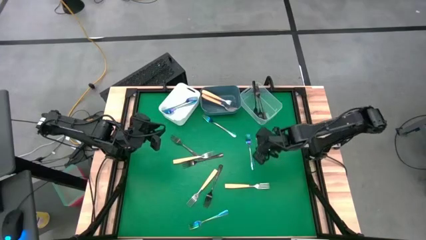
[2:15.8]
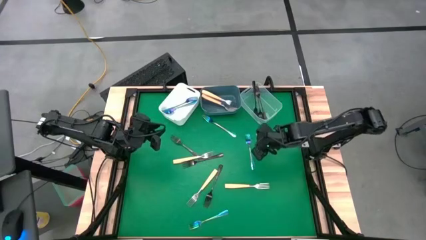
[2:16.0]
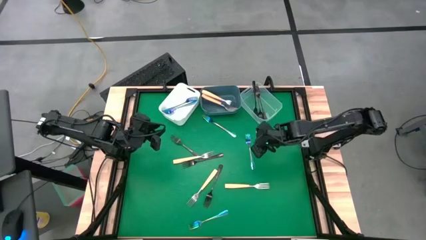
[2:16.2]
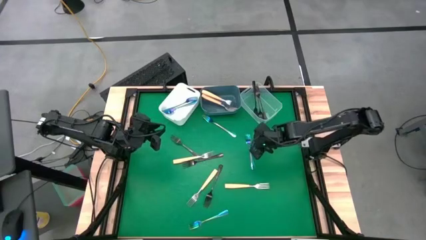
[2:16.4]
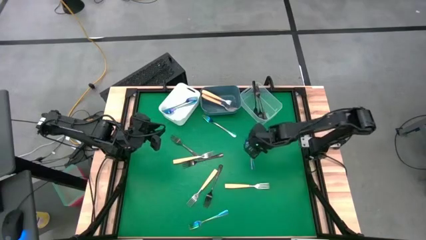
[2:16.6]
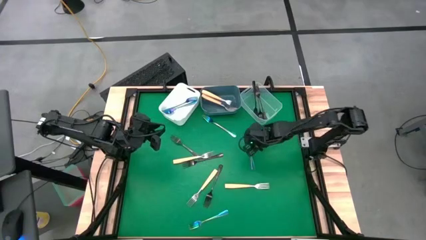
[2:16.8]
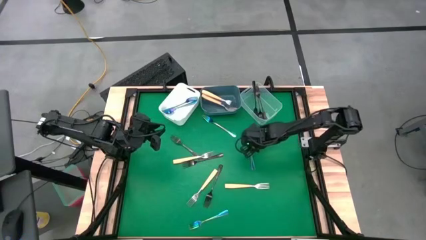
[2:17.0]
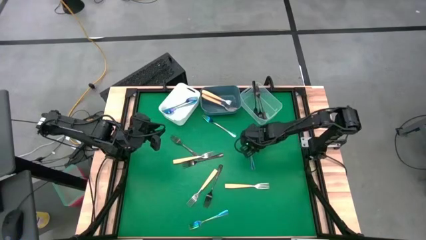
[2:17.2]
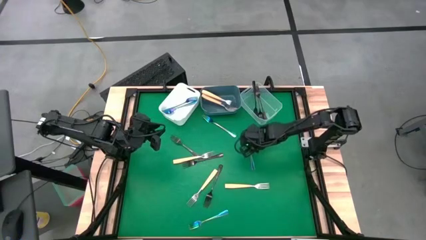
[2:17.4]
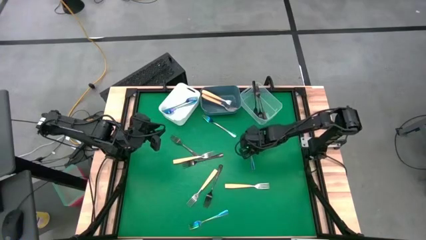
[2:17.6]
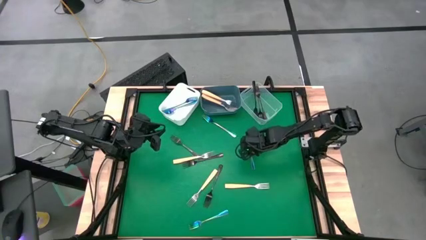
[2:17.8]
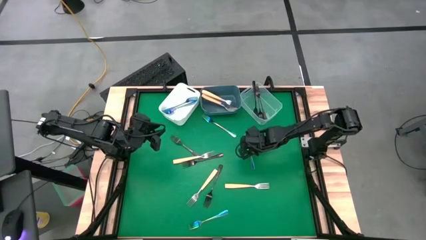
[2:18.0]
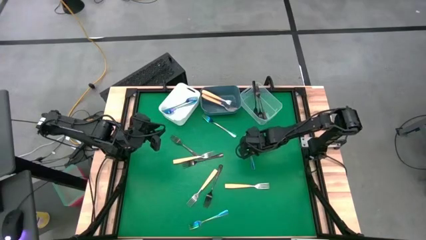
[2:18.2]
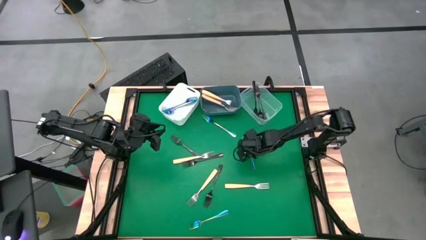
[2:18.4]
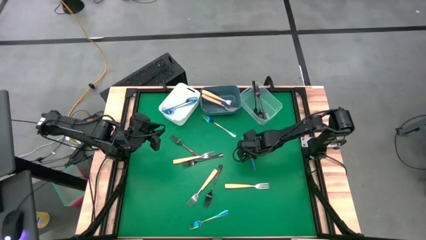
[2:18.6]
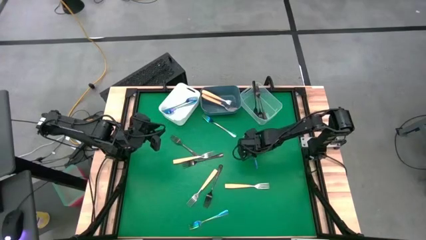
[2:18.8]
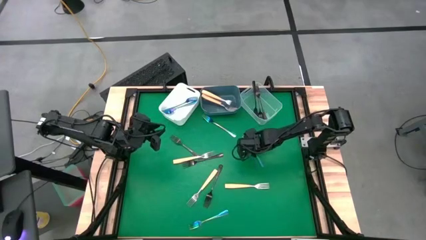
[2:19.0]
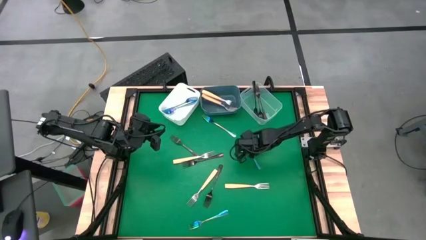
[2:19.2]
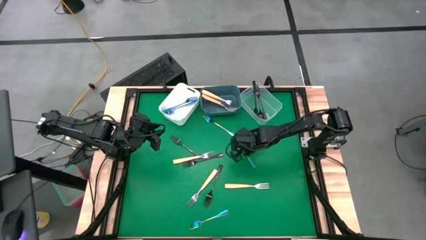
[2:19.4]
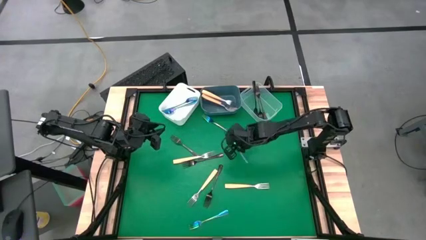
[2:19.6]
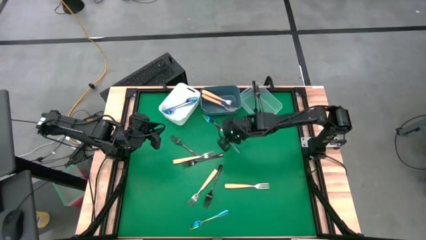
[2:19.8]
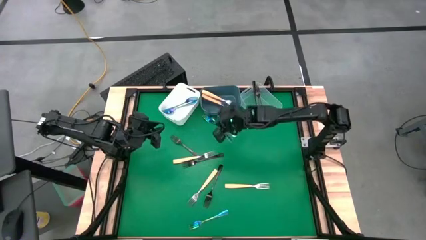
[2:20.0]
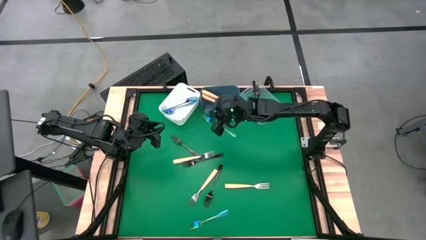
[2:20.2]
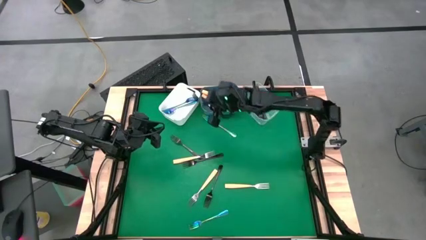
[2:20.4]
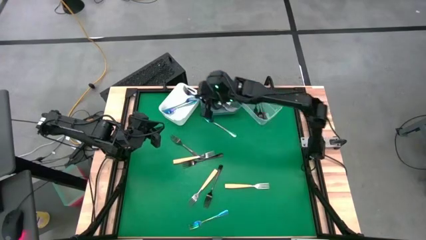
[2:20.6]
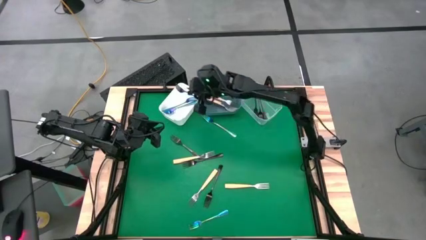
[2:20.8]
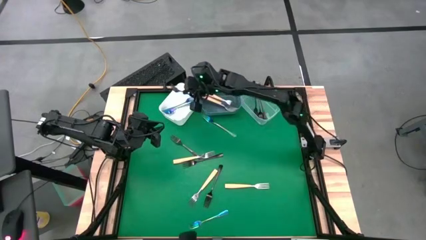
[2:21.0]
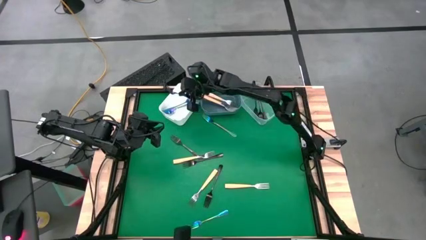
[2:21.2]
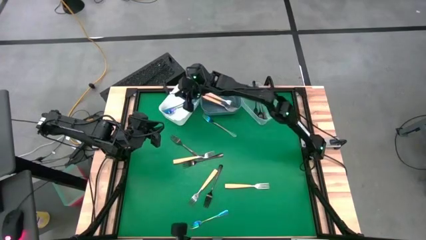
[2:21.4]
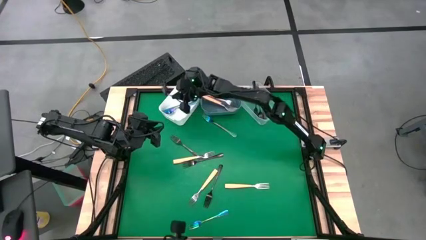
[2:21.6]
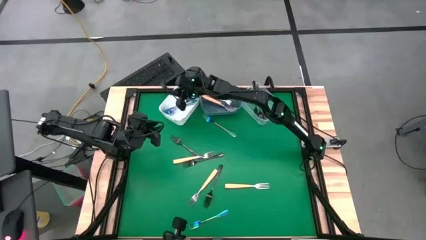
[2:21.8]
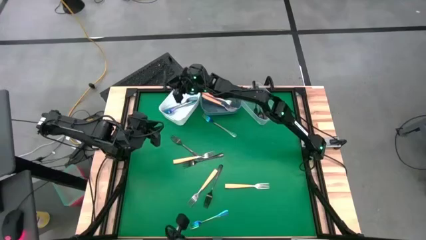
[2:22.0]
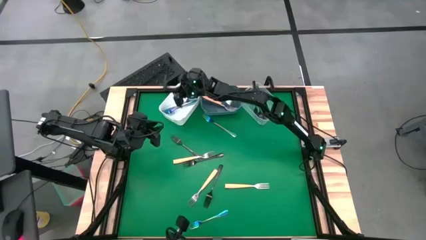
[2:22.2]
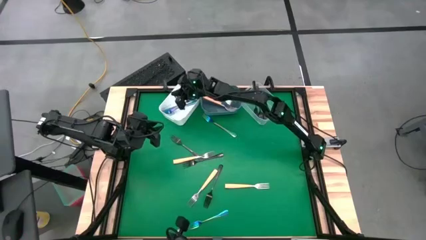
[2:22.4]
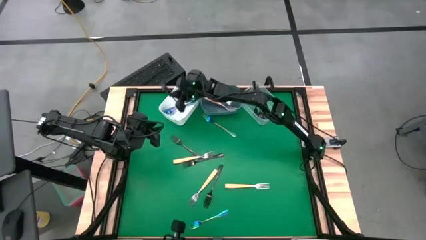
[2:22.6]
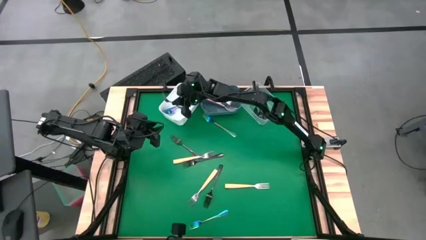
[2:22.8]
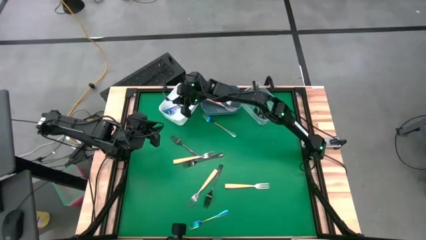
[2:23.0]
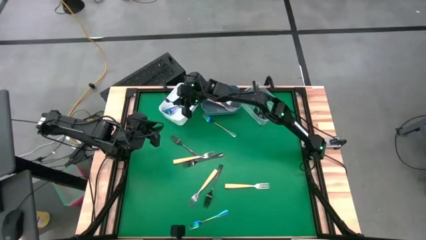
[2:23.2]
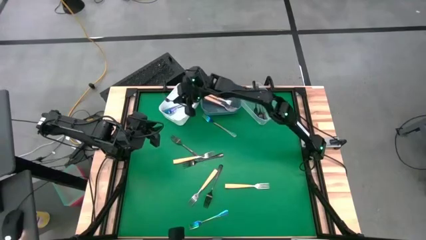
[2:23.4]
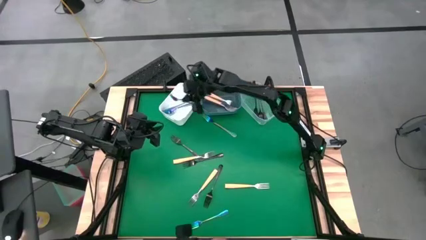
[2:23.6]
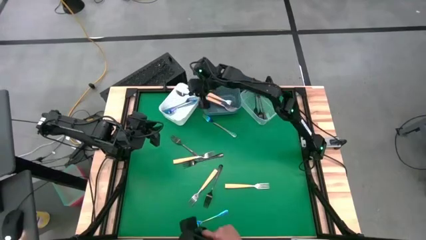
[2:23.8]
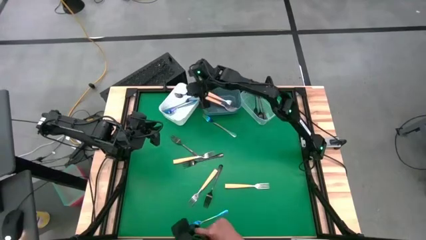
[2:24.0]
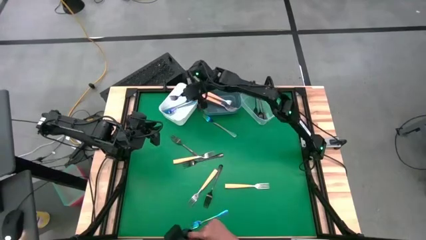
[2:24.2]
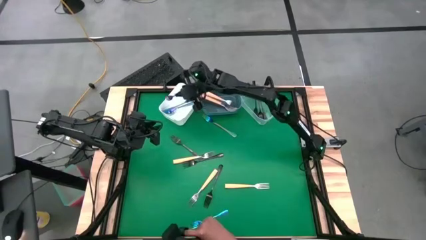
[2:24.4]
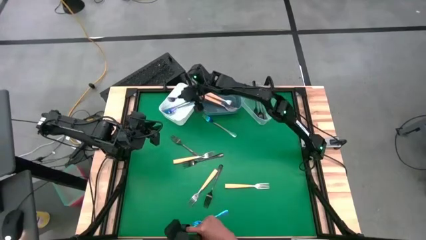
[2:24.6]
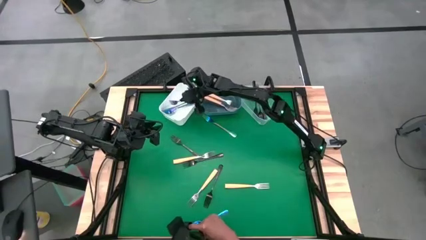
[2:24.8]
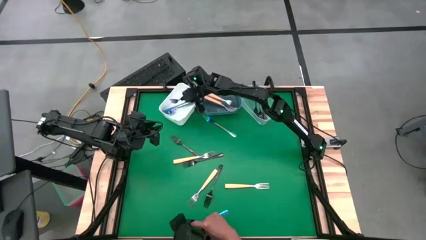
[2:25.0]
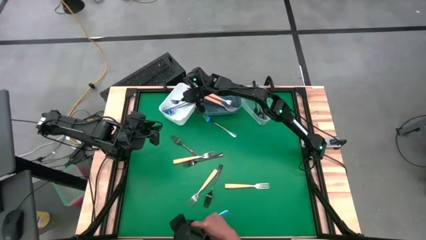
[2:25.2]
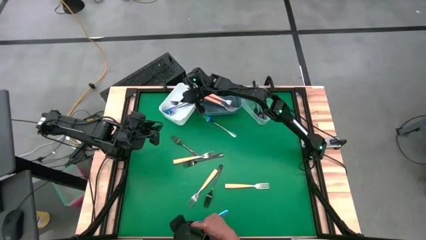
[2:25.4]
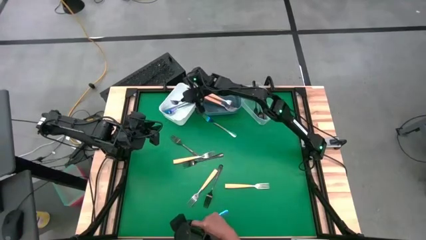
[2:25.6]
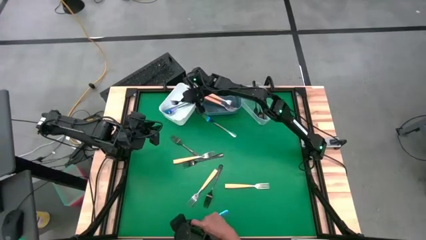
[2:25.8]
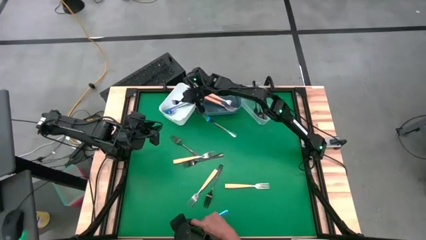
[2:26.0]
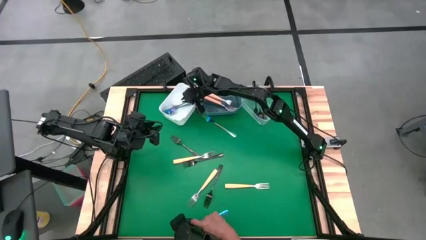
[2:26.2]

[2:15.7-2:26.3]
Task: Sort silverware by color (type)
Put the blue fork into the white bin

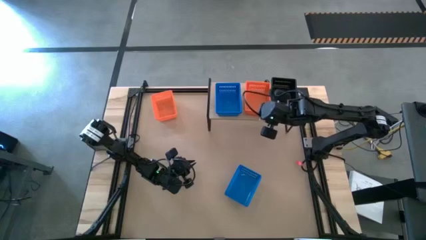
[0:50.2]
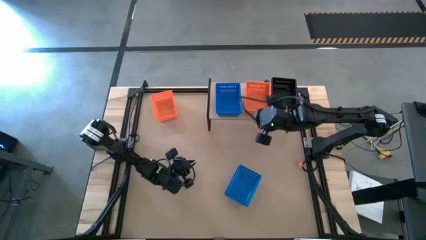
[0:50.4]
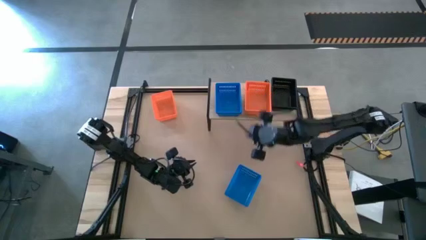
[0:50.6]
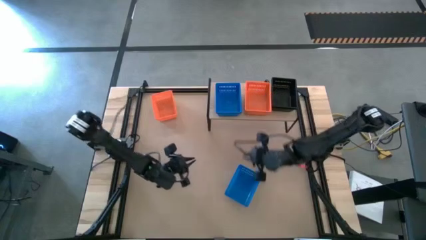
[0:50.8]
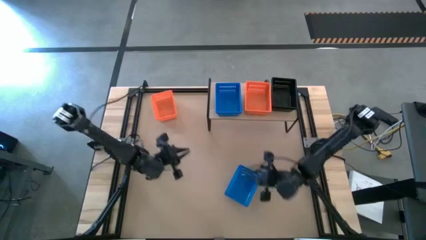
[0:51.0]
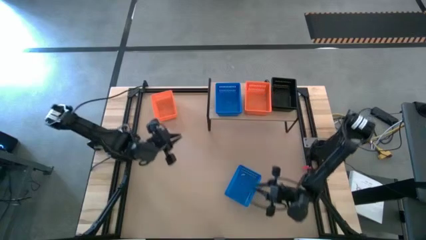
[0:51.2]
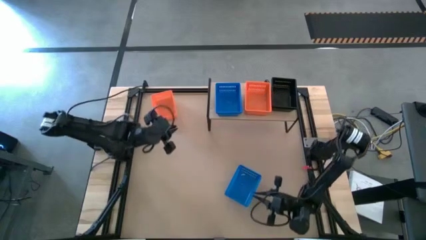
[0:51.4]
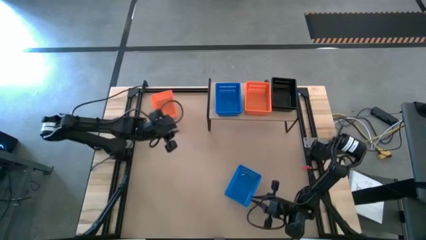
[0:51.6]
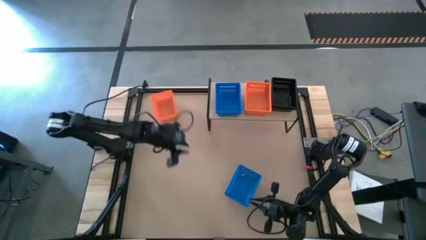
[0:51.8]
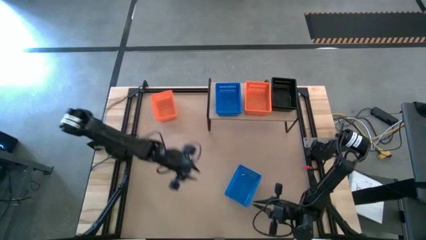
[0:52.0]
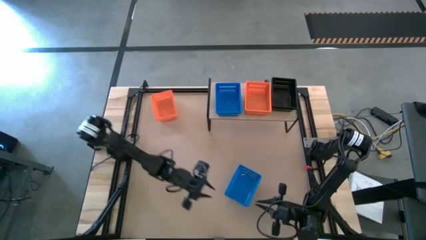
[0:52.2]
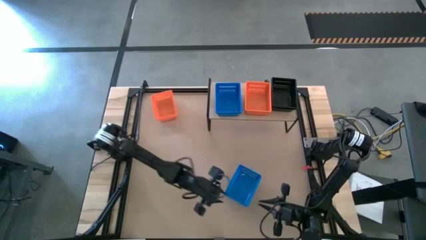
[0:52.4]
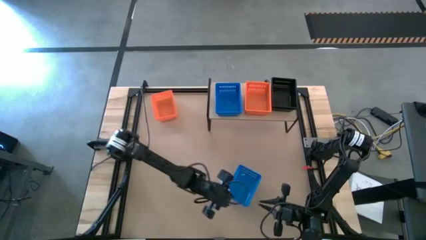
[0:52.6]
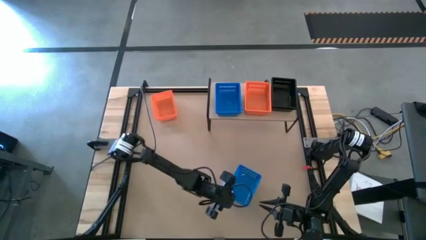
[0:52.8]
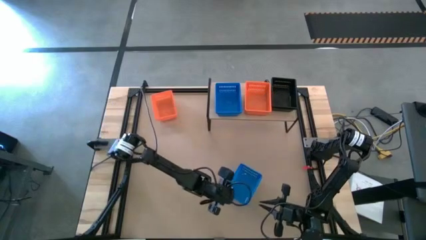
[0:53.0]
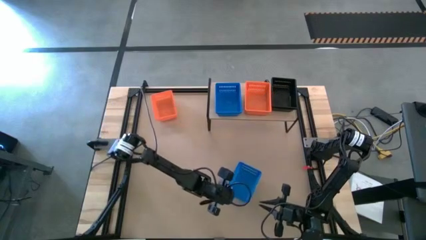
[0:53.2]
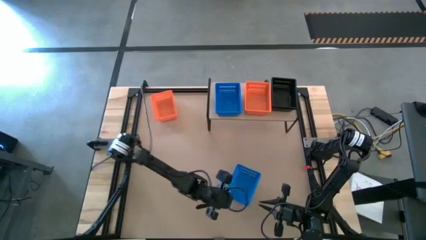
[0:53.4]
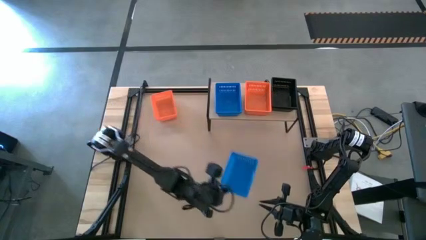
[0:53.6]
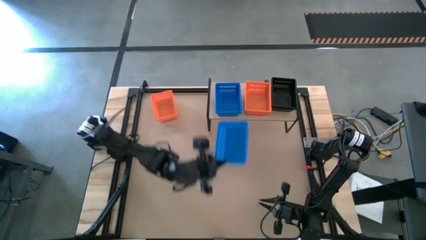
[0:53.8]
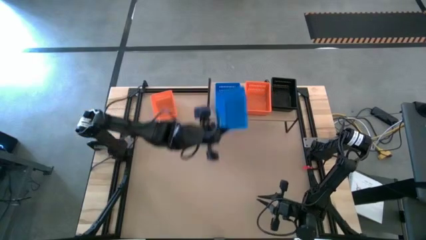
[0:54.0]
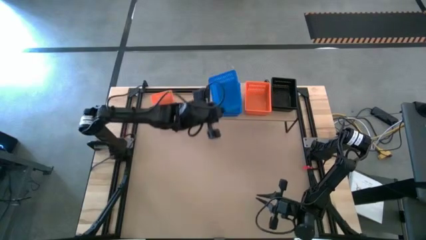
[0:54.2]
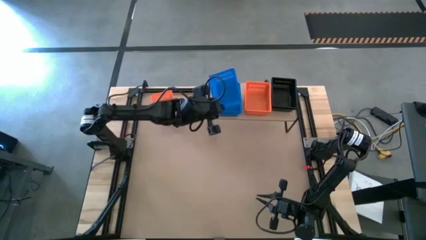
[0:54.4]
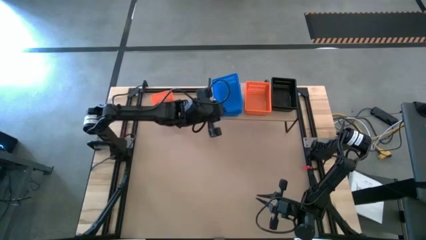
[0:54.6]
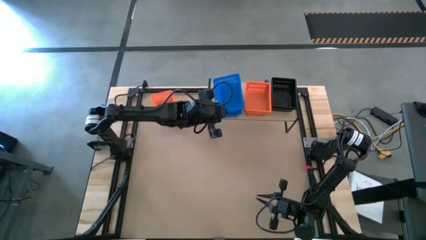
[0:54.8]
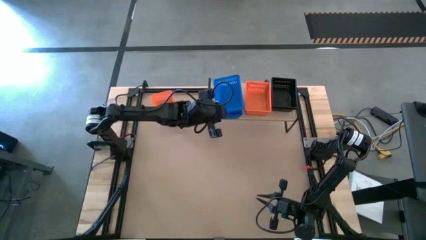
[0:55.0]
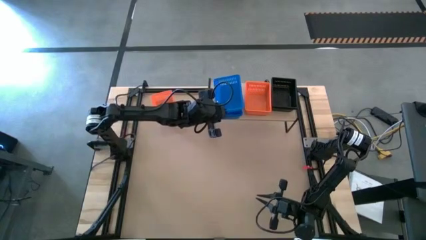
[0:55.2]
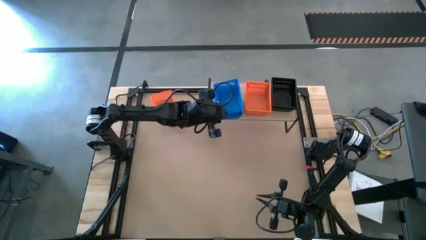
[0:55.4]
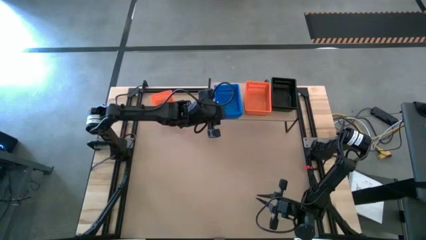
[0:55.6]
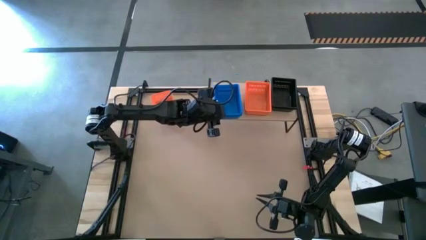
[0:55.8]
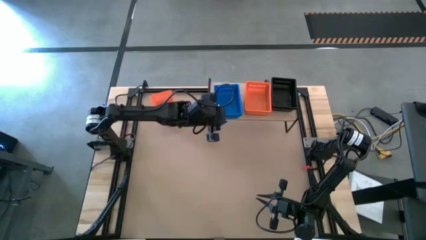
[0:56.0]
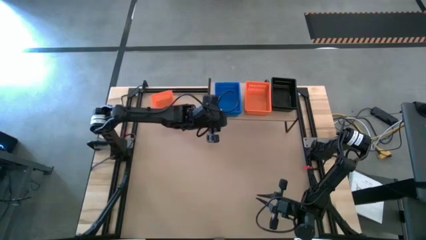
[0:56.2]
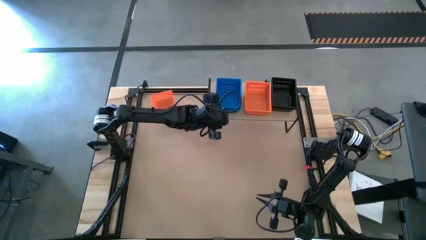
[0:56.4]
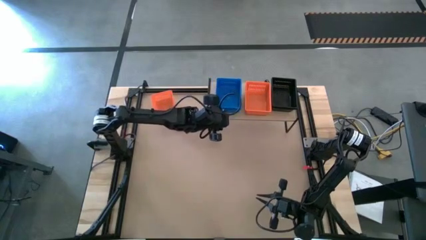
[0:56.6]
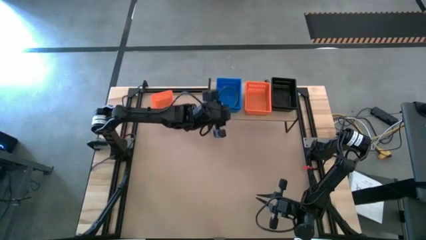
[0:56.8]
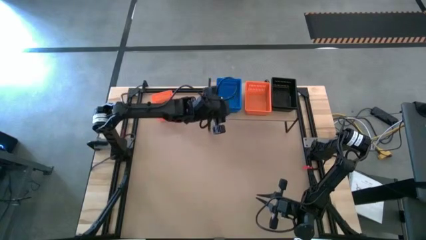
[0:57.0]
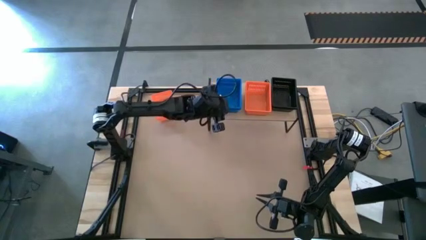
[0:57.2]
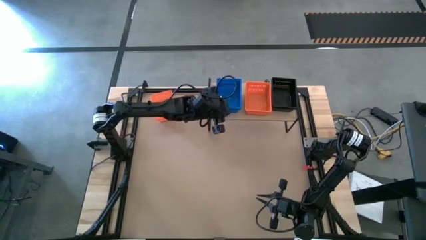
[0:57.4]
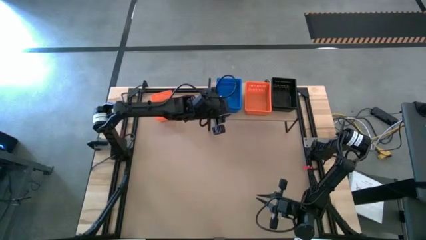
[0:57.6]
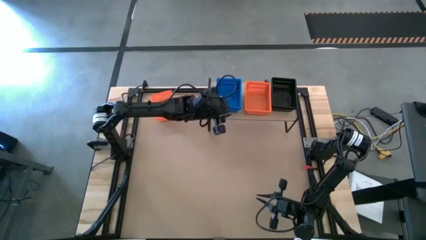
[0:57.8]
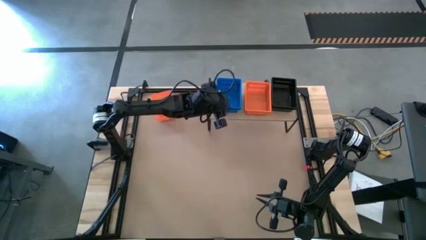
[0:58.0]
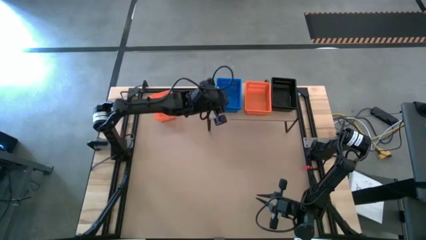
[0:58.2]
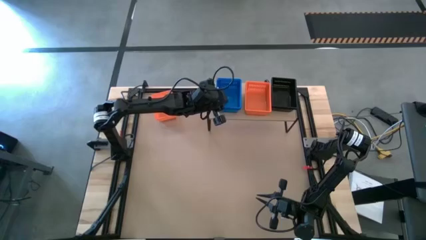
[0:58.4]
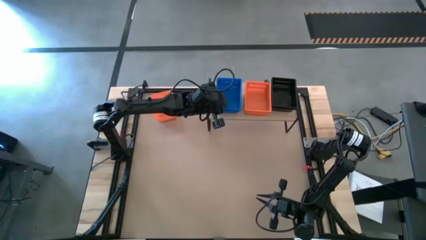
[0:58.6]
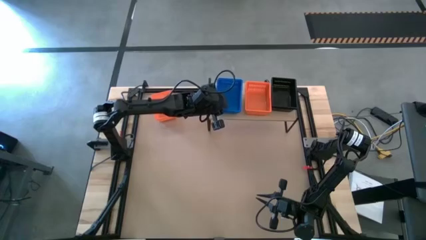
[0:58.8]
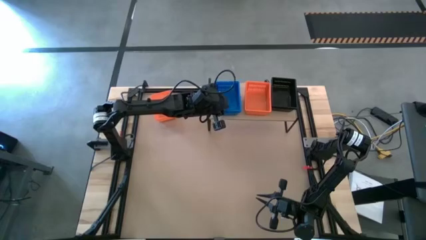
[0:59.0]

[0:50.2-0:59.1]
Task: Stack baskets on shelf by color
Stack the blue bin on top of the blue bin on the shelf
